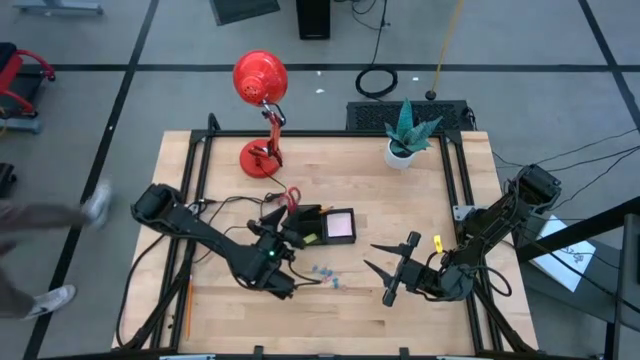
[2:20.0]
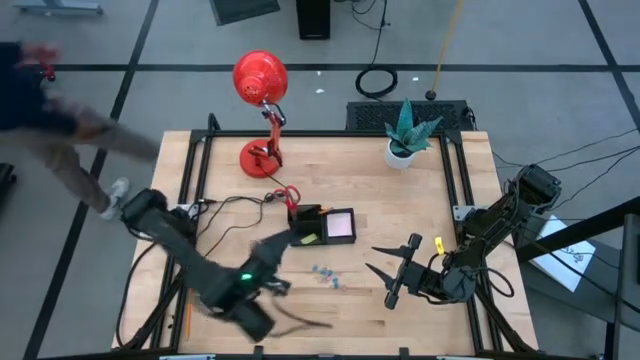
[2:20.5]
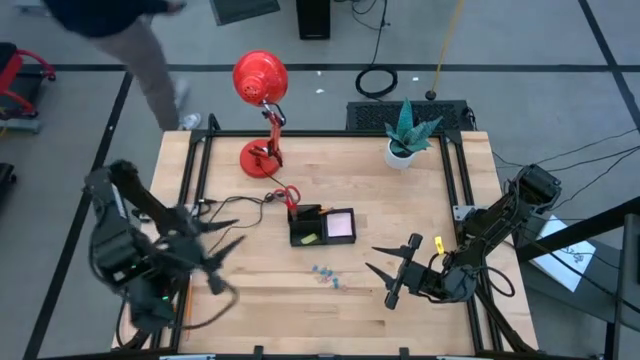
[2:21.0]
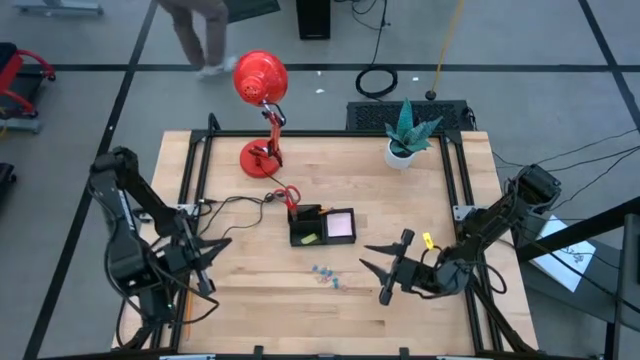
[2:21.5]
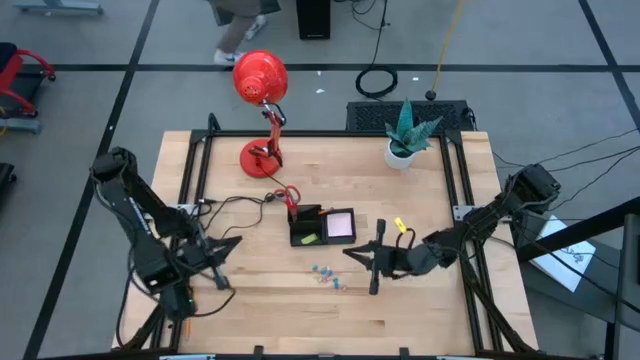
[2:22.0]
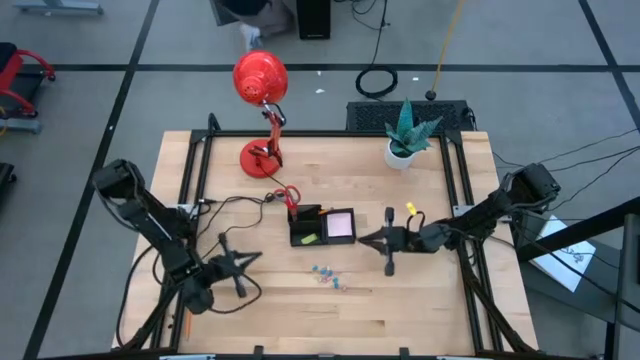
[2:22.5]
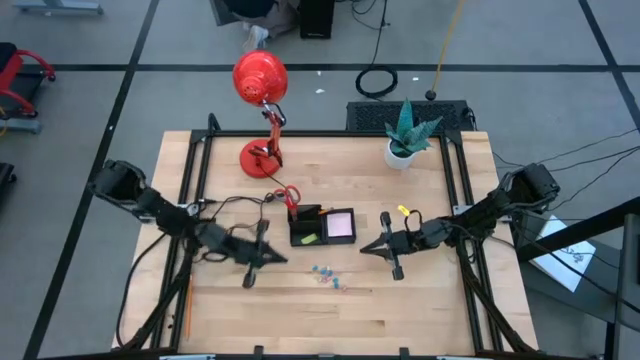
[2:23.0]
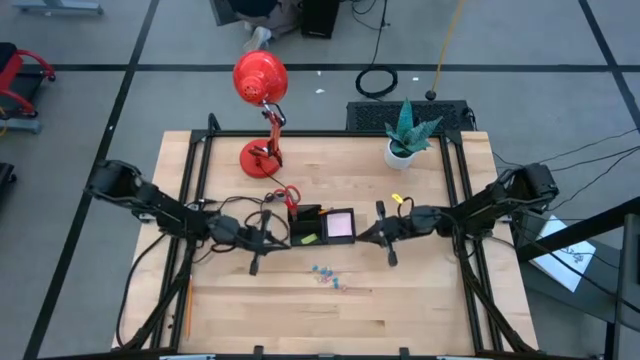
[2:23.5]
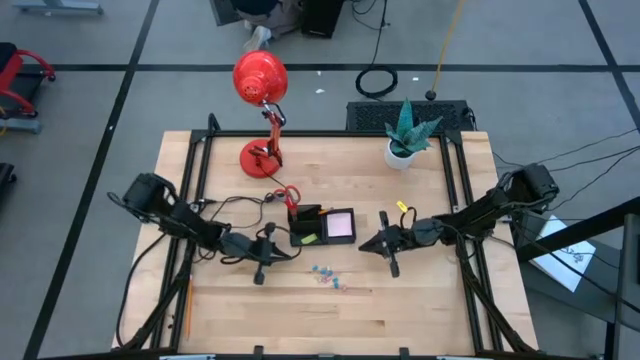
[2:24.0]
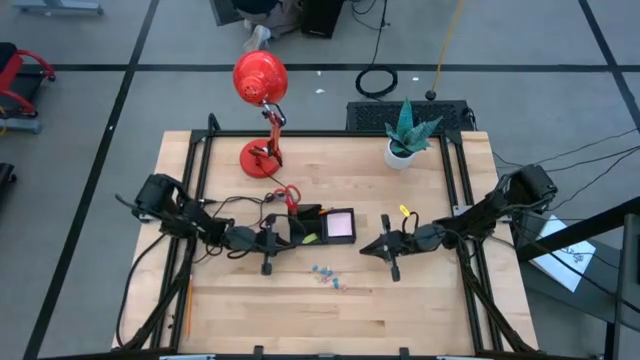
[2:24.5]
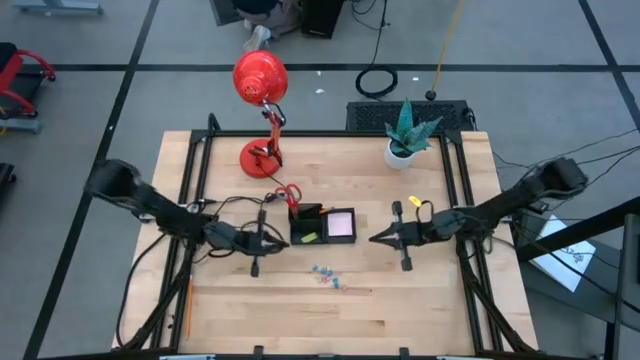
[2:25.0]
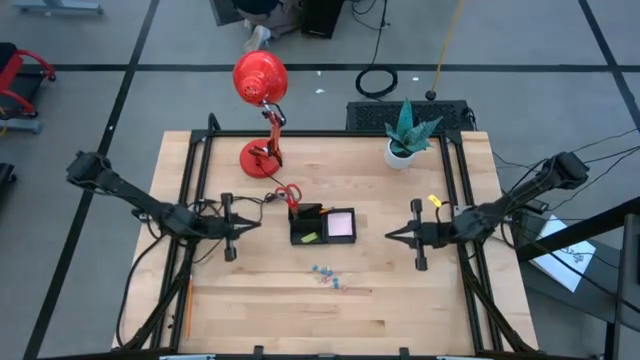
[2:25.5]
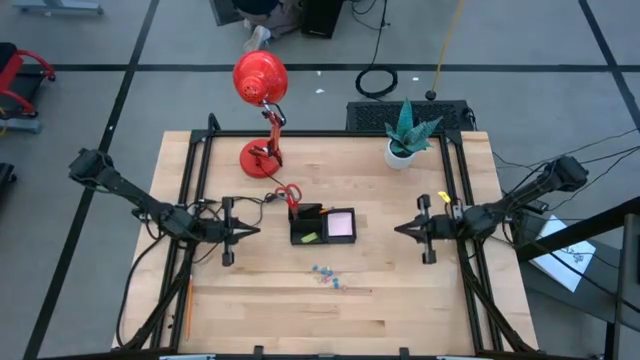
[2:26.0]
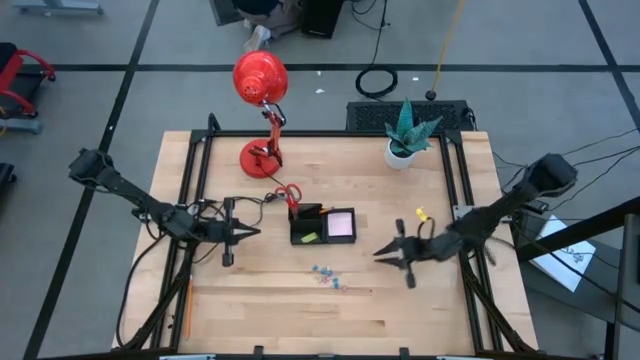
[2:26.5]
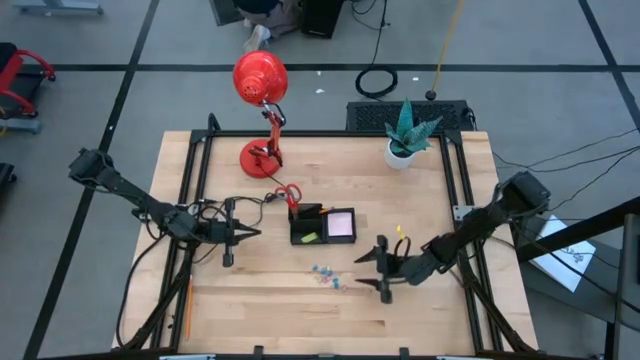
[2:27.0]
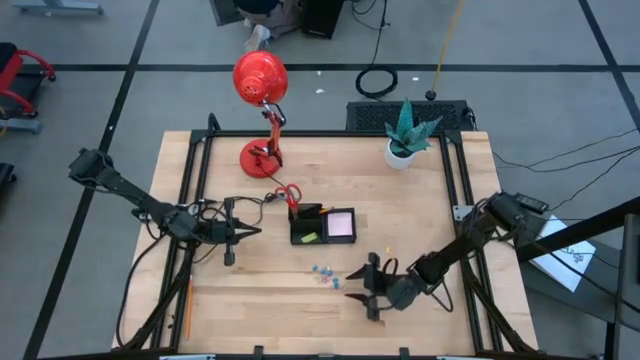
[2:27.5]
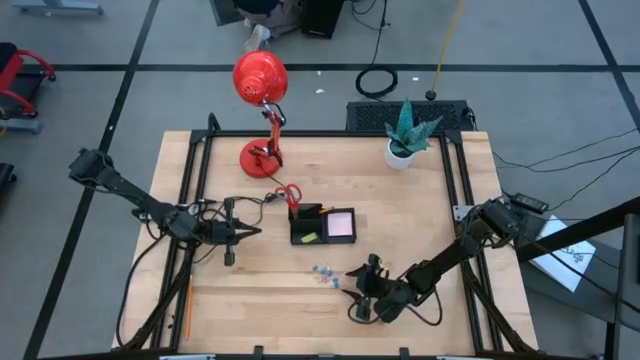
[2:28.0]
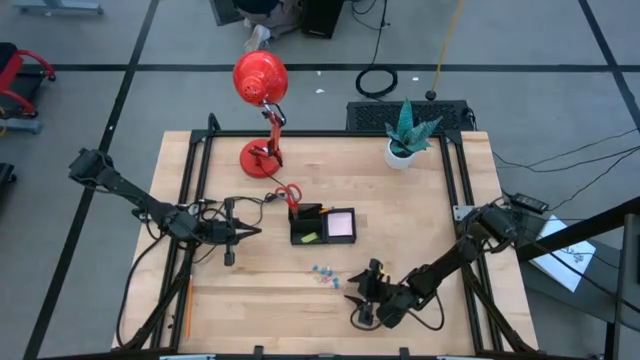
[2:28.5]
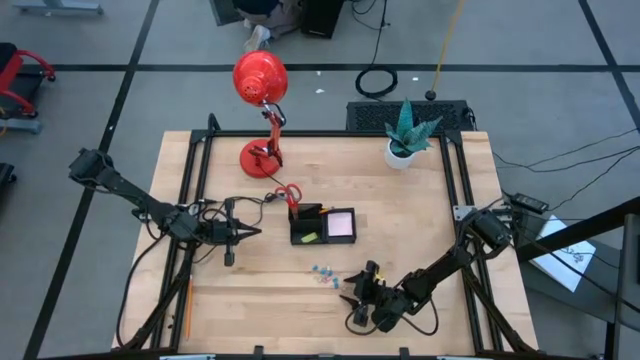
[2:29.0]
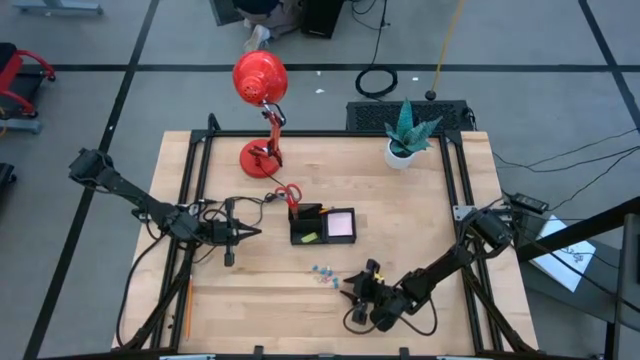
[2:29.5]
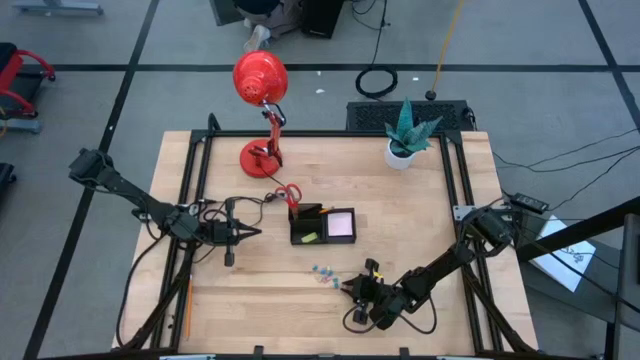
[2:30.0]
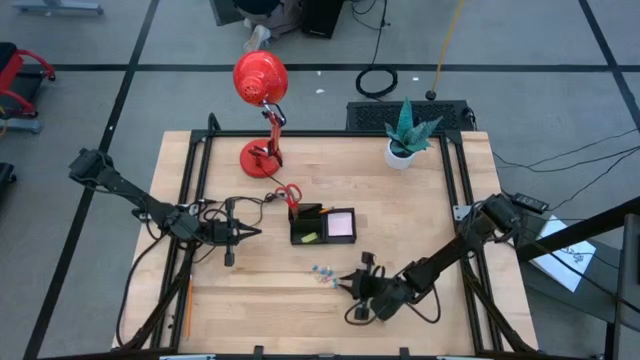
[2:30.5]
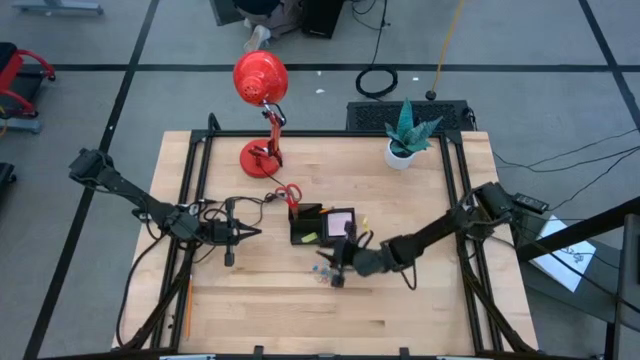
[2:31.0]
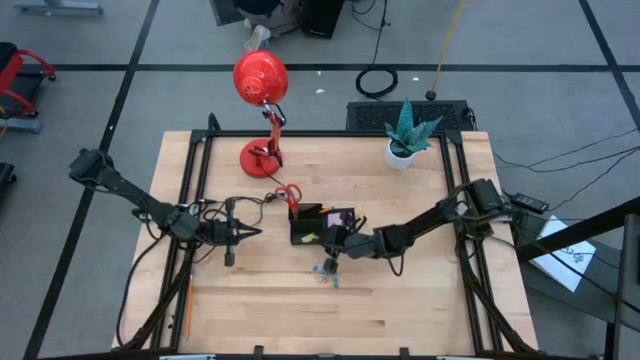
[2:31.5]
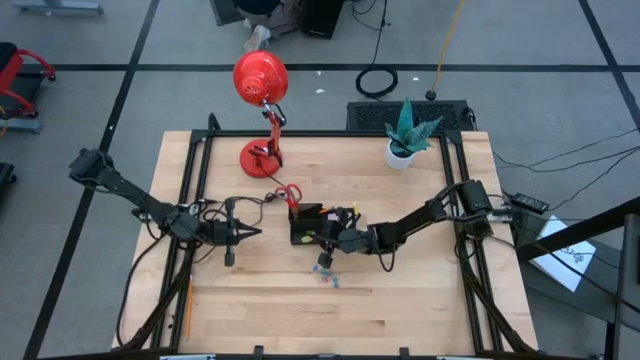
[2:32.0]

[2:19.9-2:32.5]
Task: Pick and place office supplies into organizer
Put the pink binder clip into the black desk organizer

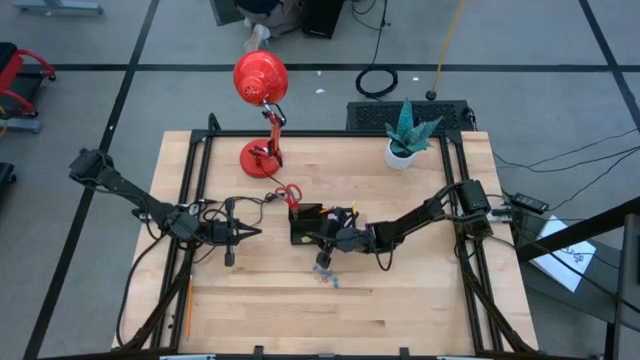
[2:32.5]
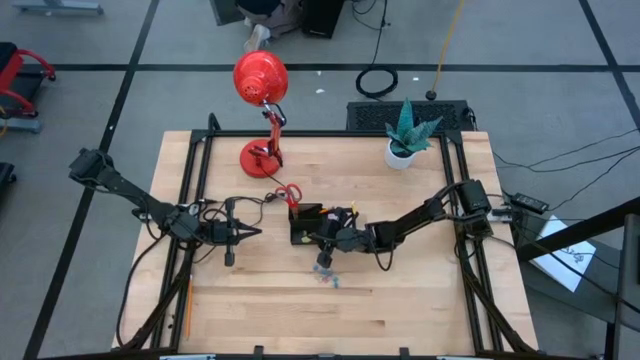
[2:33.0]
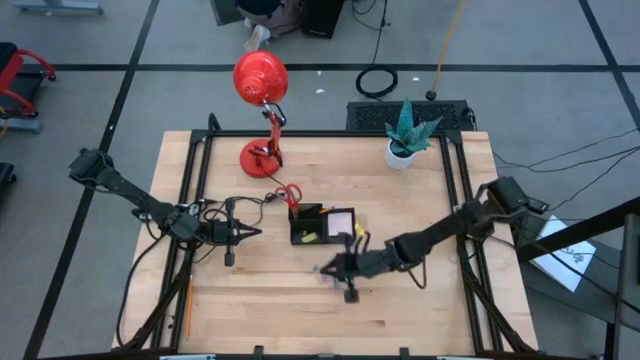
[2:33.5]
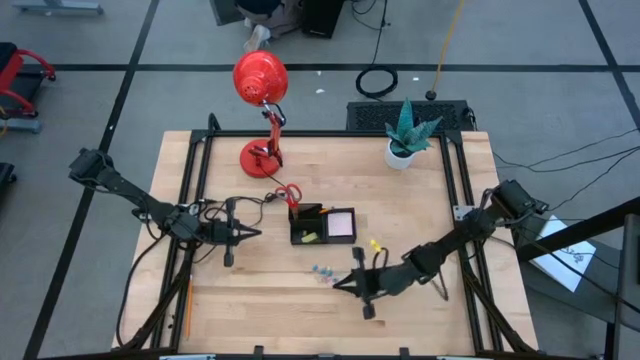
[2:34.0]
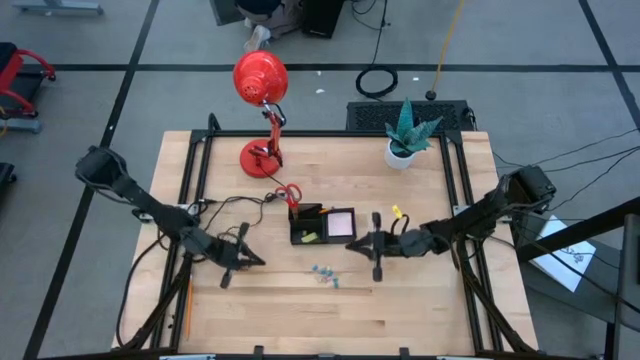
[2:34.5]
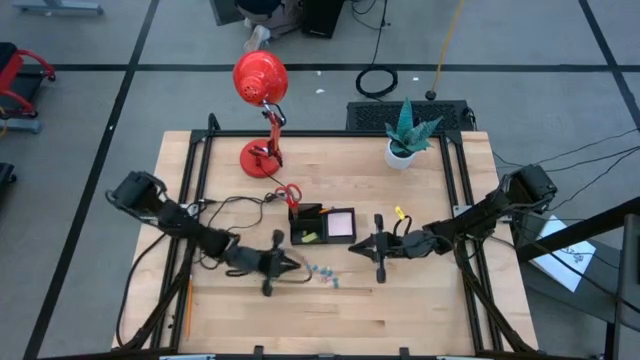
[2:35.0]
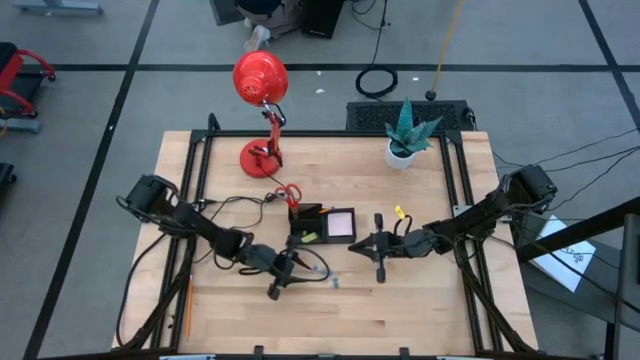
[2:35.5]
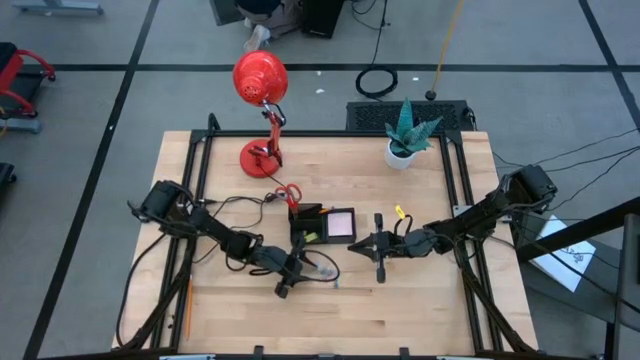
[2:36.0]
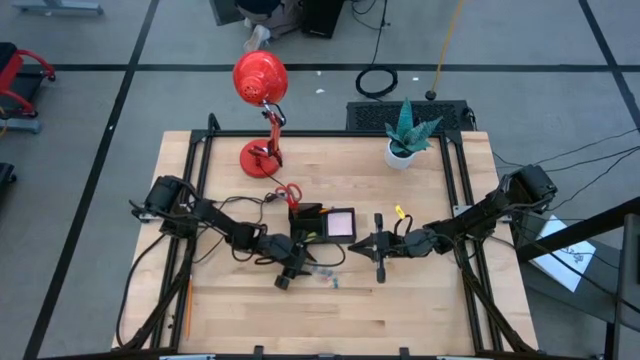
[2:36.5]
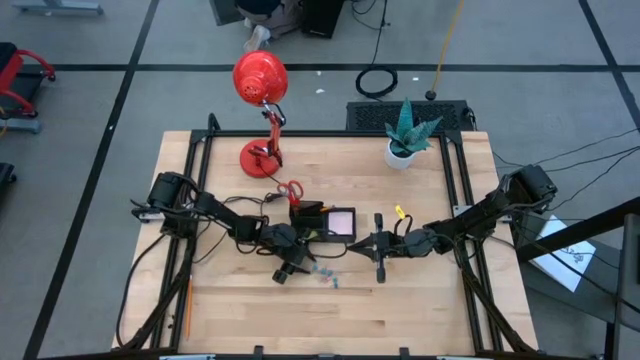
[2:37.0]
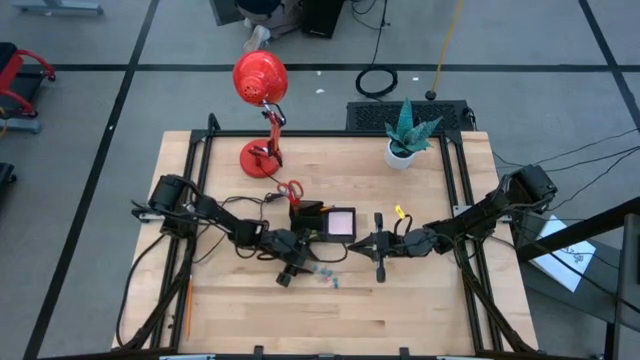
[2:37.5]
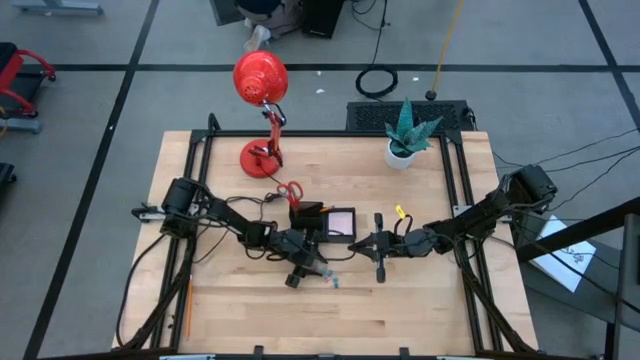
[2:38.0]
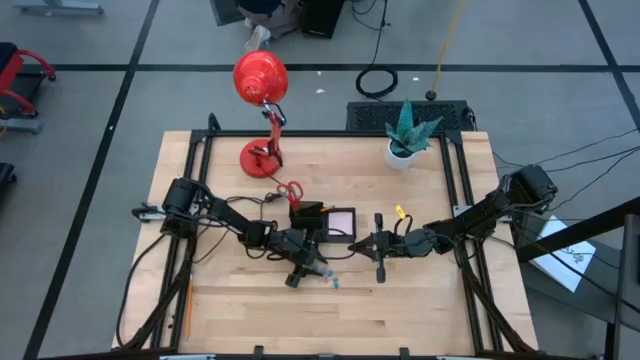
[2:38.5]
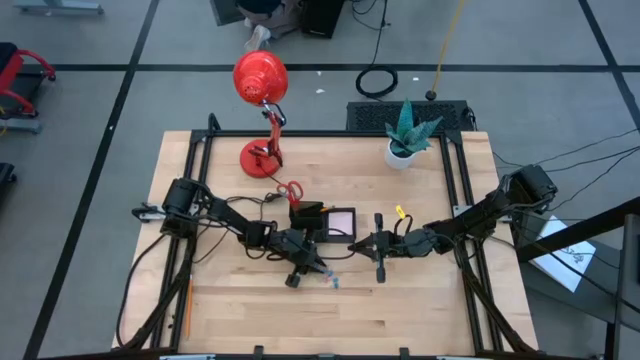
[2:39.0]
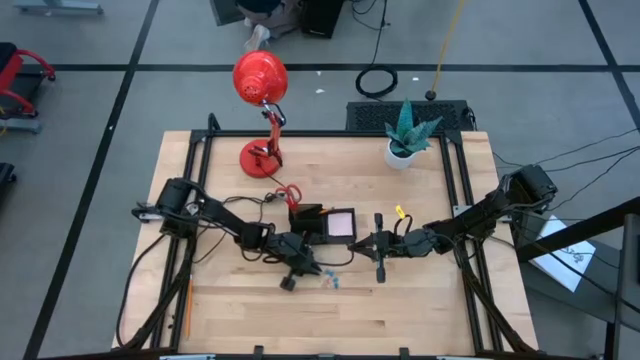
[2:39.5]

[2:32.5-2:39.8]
Put the blue binder clip into the black desk organizer

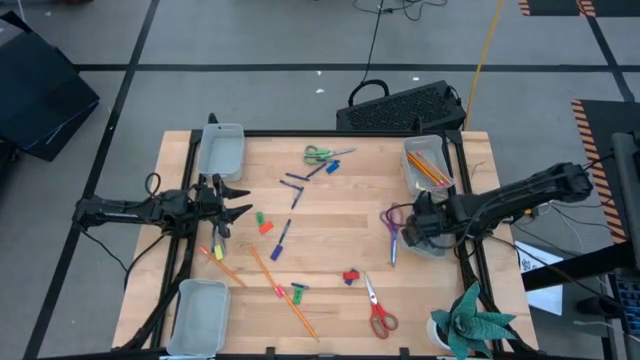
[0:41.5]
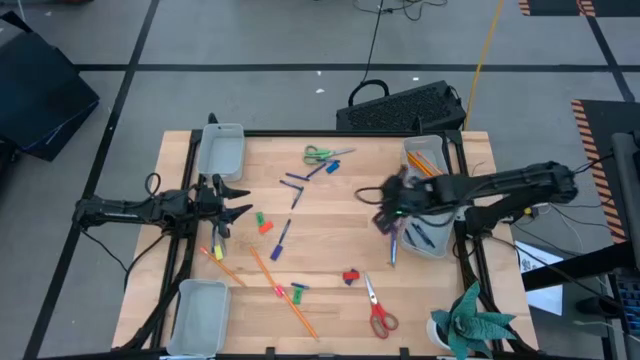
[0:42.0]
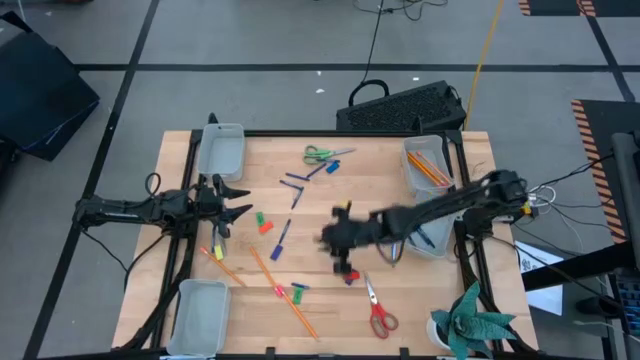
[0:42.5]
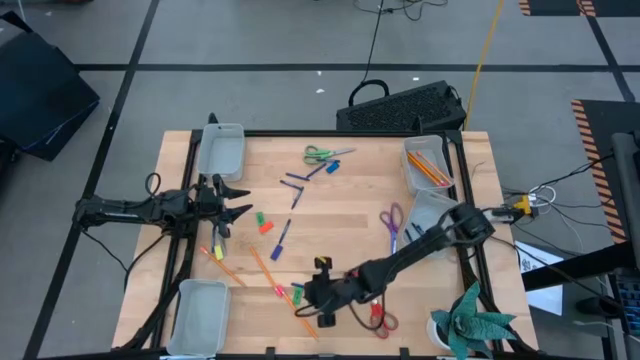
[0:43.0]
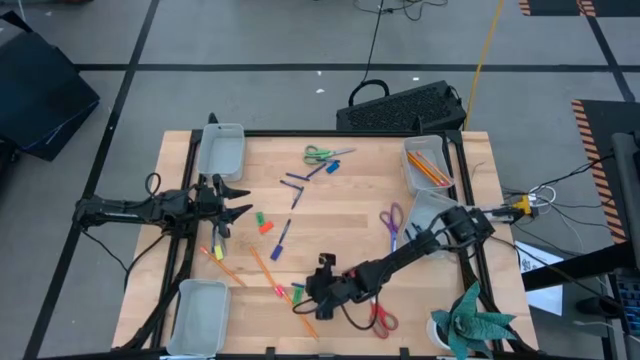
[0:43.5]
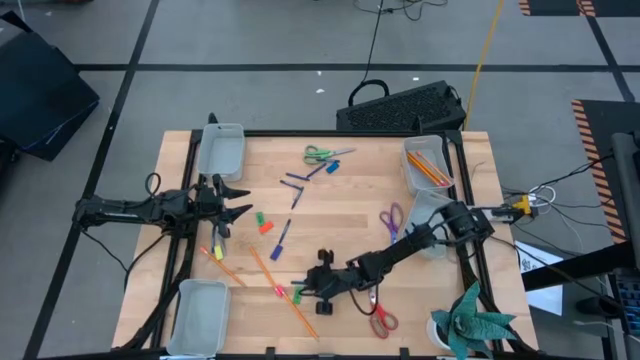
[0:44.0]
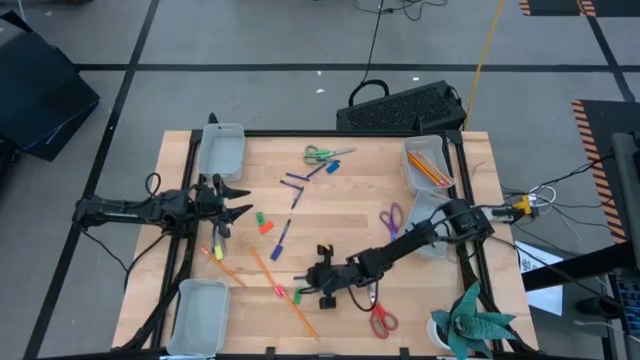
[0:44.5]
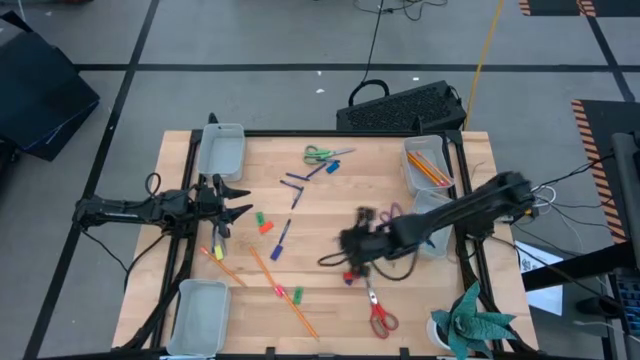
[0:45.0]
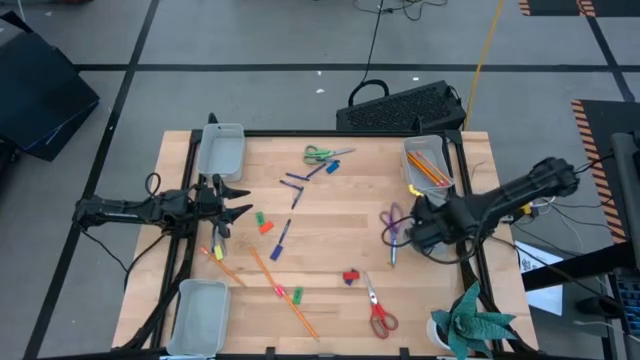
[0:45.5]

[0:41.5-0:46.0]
Task: Sort crayons/erasers/pens/pencils in bins
Put the blue crayon into the middle right gray bin
